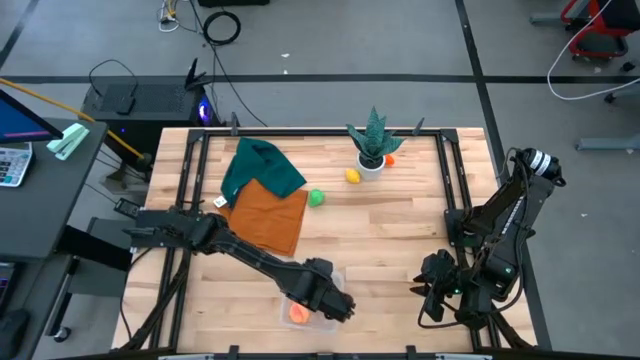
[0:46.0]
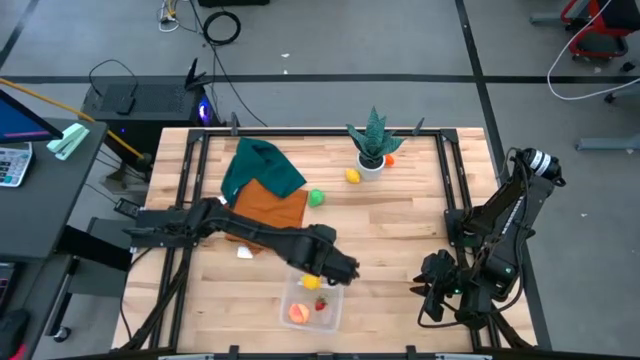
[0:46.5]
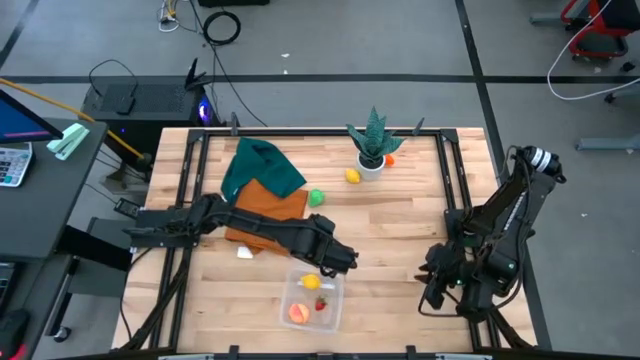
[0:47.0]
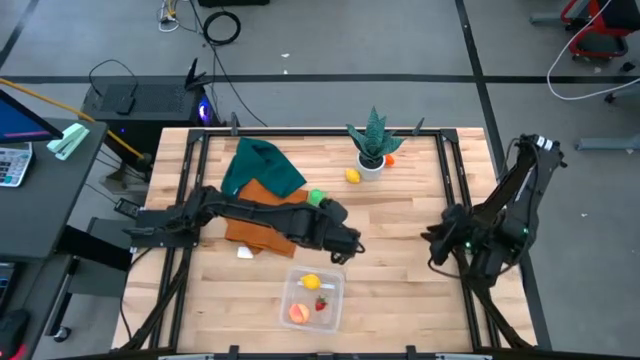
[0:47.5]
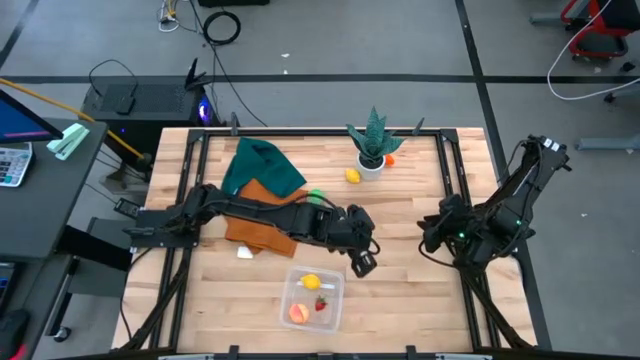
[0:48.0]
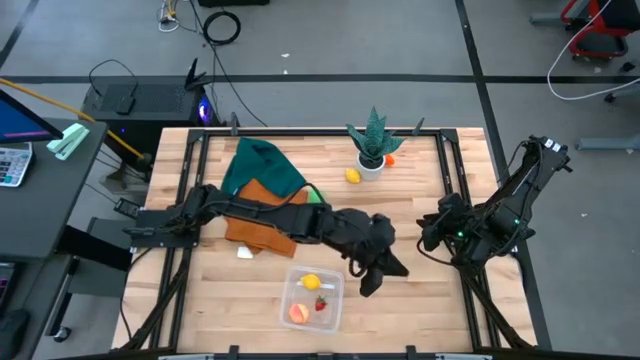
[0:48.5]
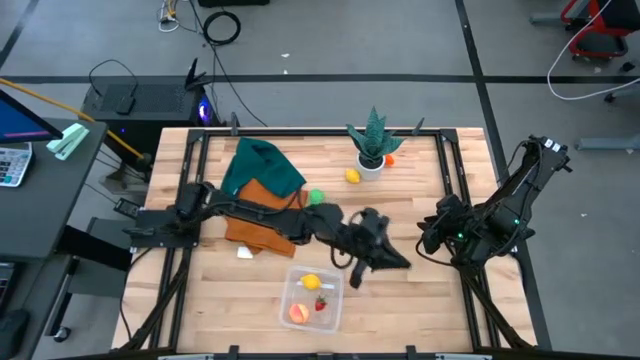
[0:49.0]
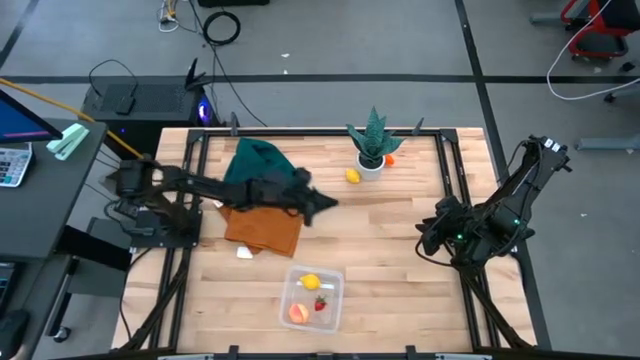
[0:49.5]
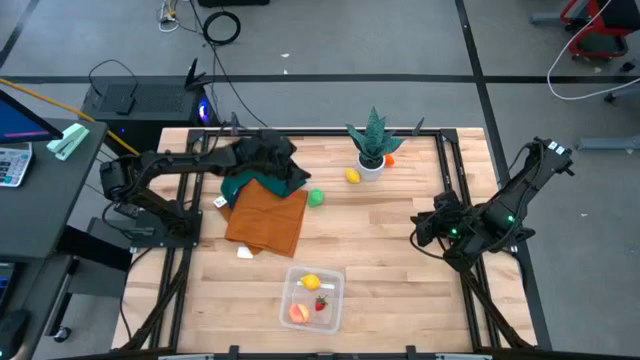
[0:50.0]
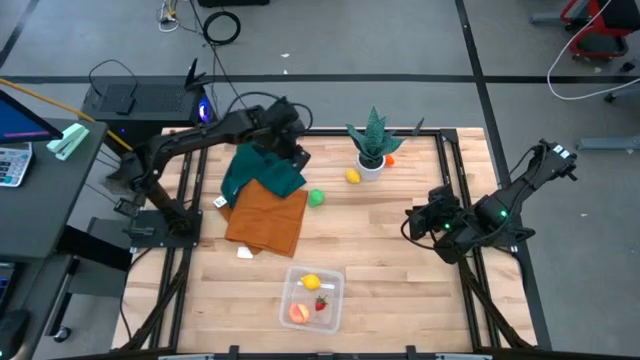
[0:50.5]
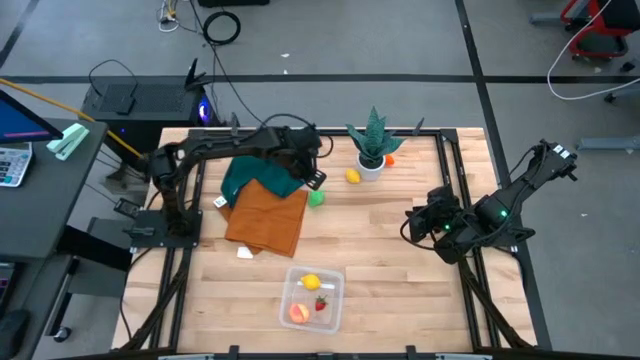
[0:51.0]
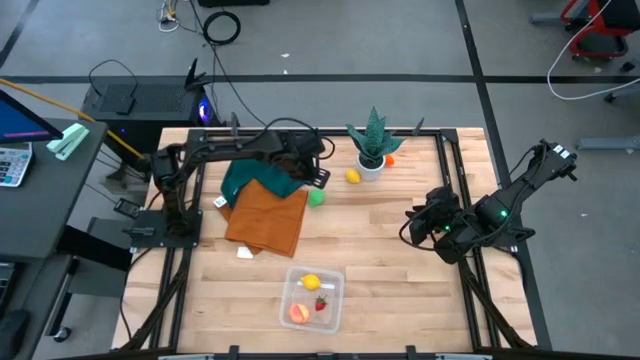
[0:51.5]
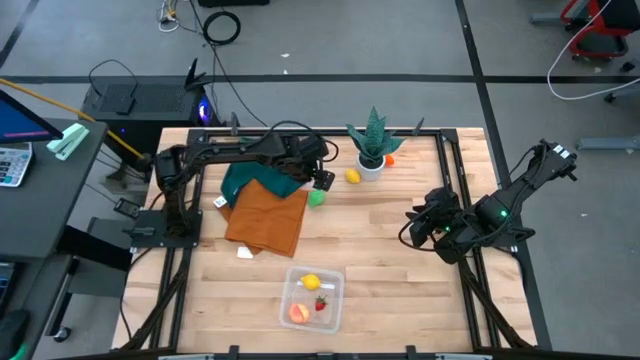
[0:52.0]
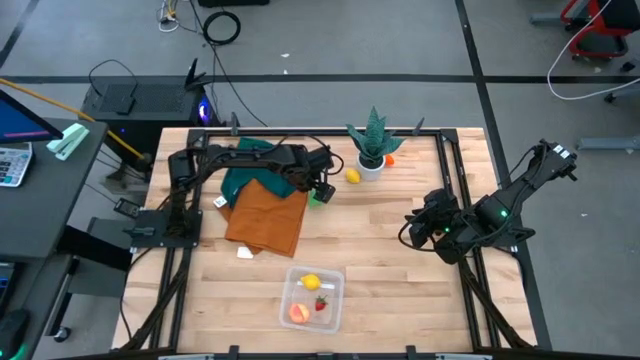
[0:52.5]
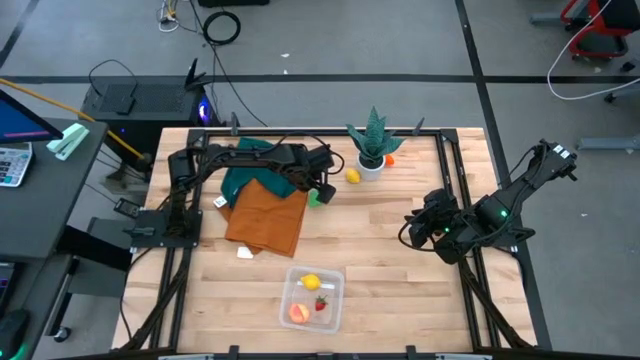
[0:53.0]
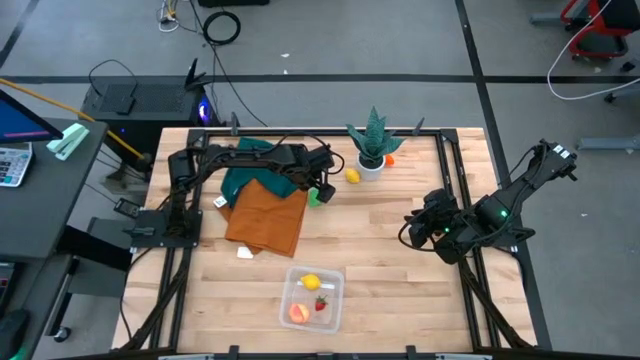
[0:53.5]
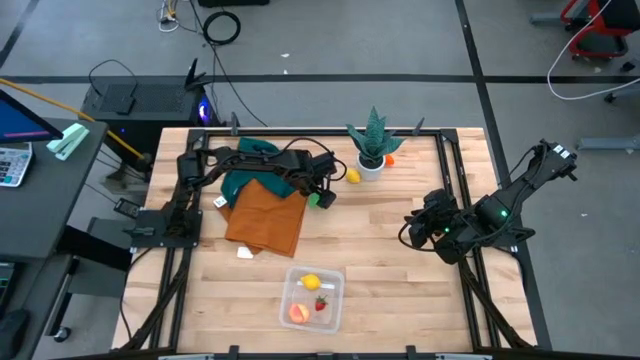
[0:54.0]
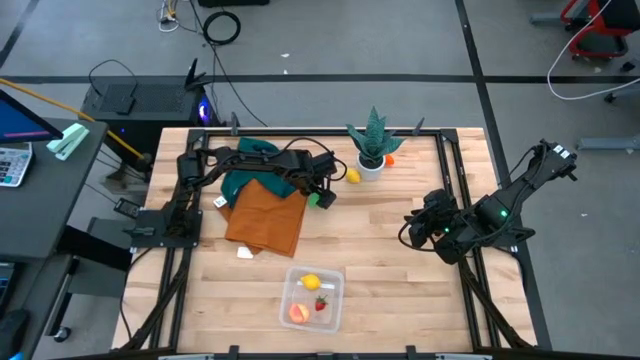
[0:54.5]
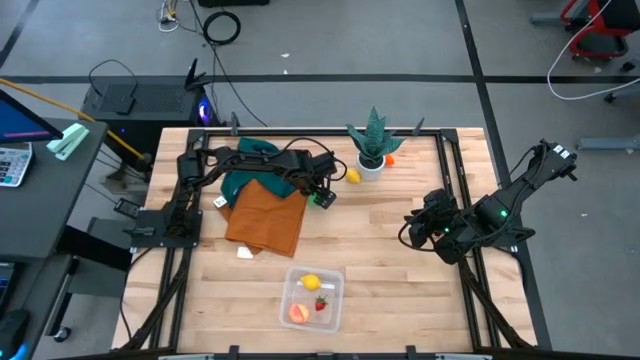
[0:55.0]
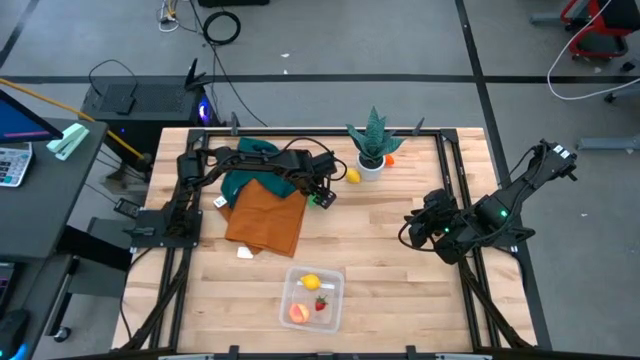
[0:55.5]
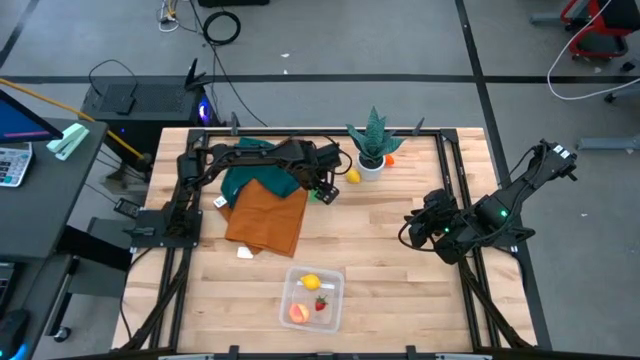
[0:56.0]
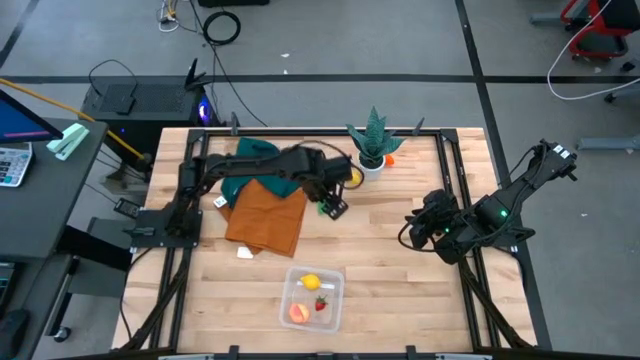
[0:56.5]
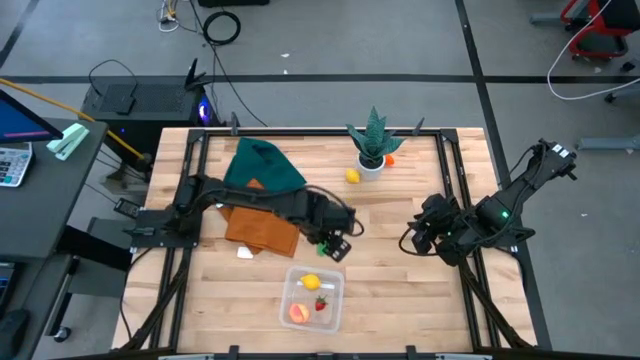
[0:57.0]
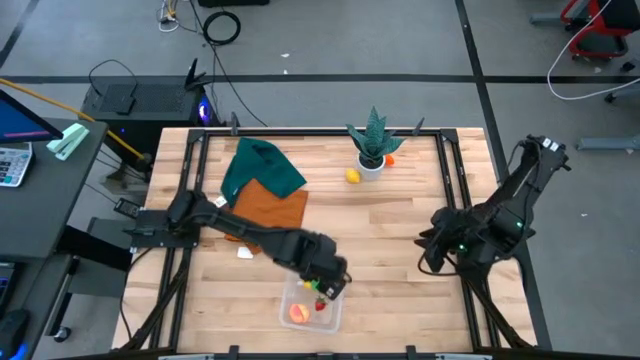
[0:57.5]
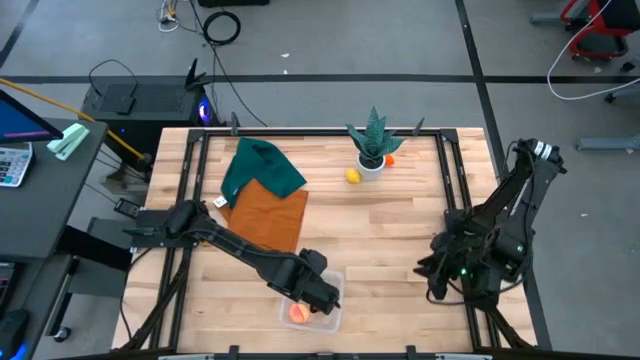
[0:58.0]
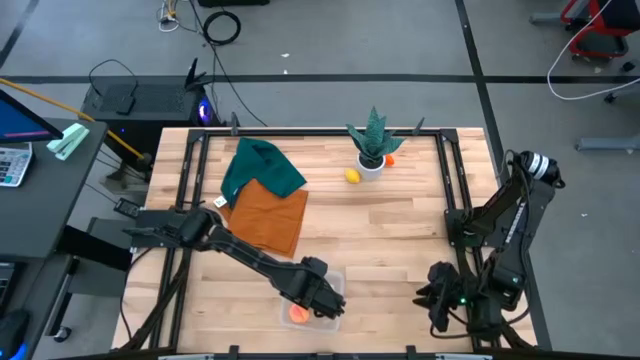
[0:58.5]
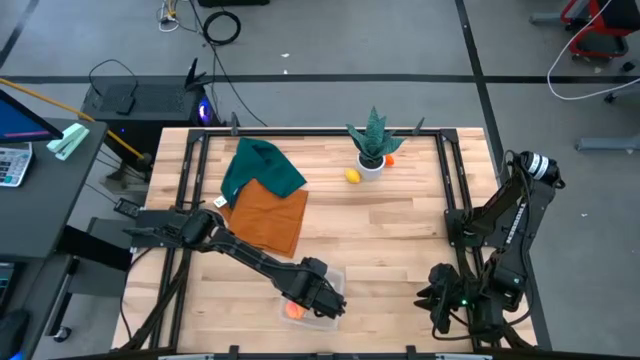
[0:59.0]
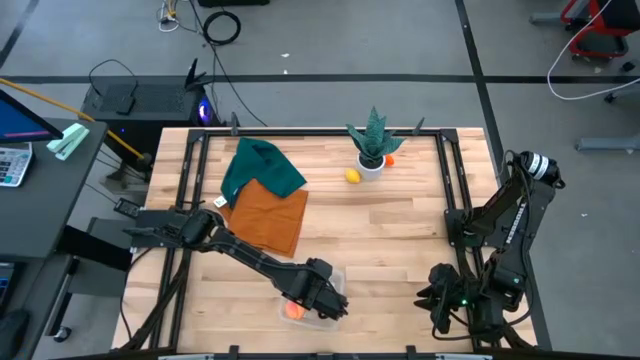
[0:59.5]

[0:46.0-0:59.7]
Task: Pick and placing Produce into tupperware
Put the green pear into the transparent bin

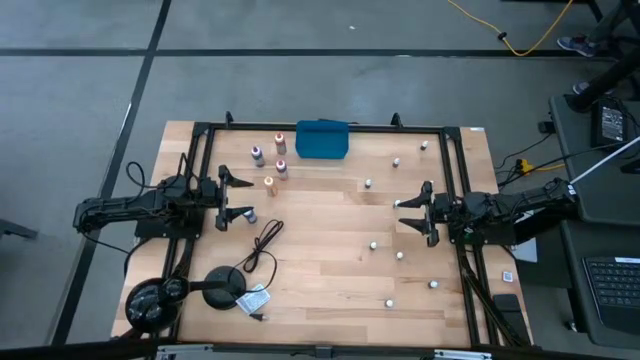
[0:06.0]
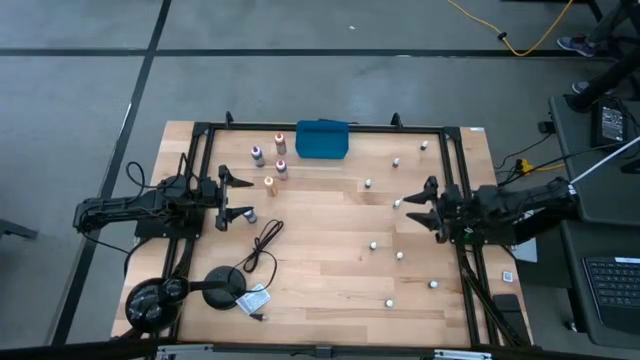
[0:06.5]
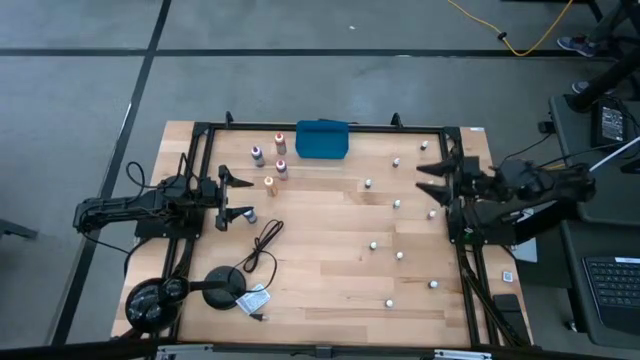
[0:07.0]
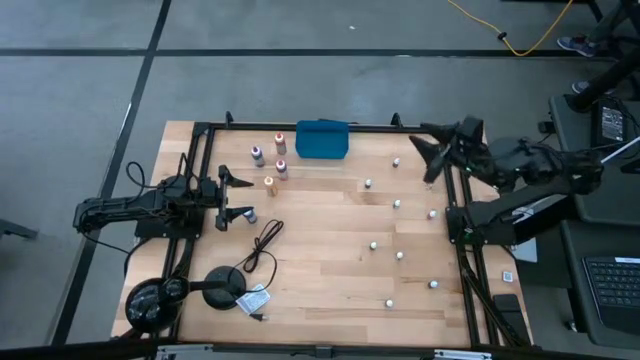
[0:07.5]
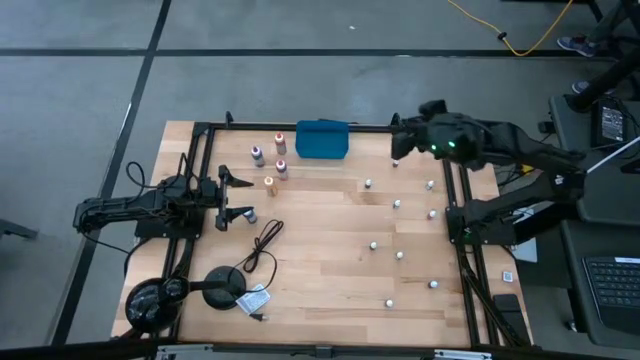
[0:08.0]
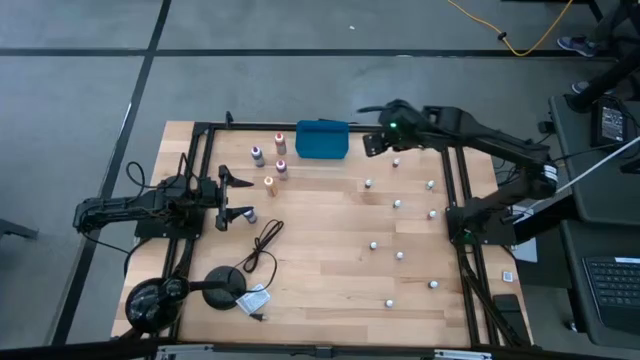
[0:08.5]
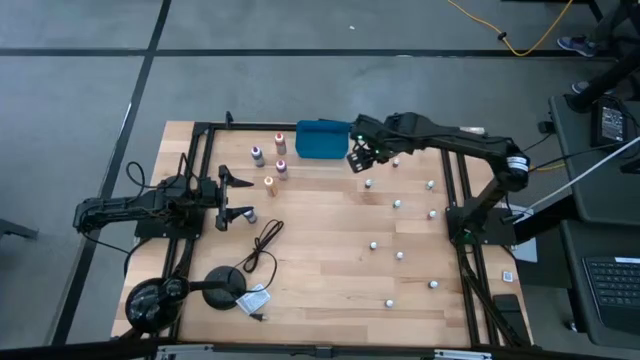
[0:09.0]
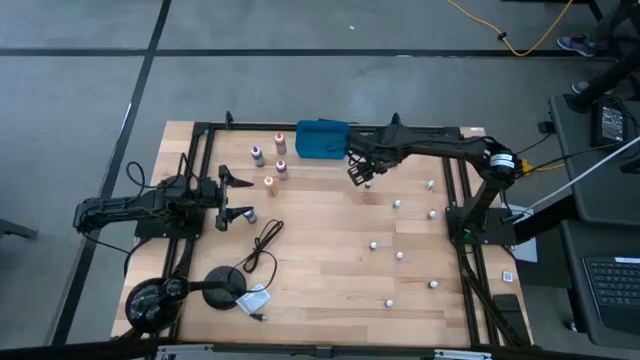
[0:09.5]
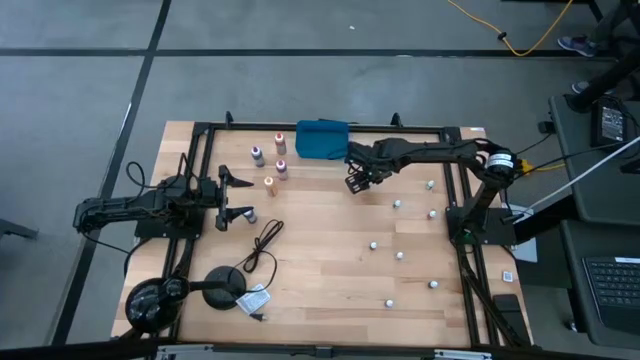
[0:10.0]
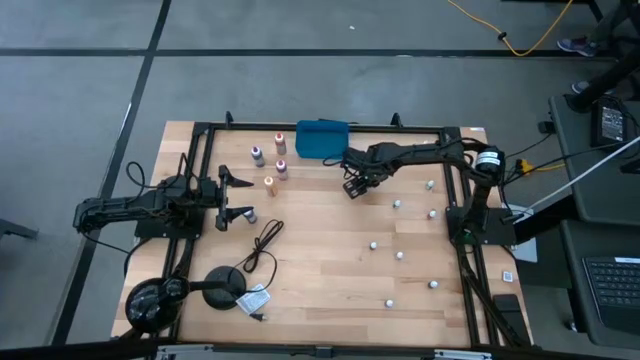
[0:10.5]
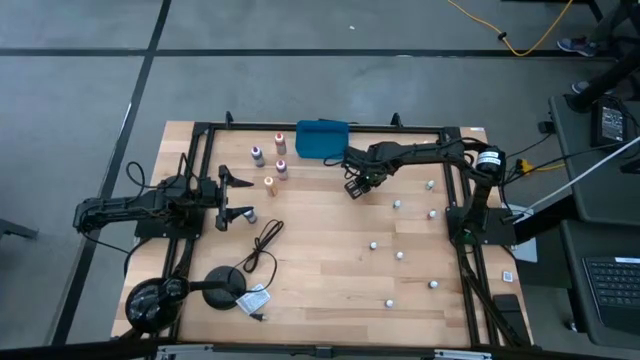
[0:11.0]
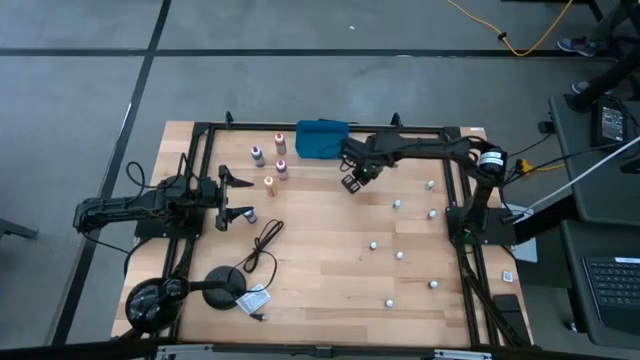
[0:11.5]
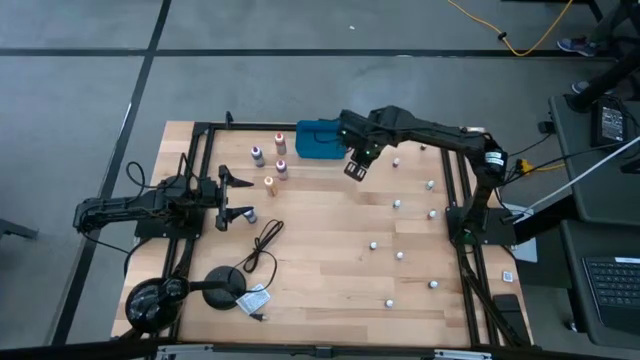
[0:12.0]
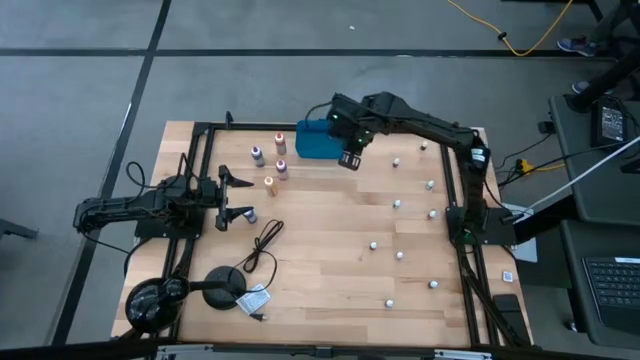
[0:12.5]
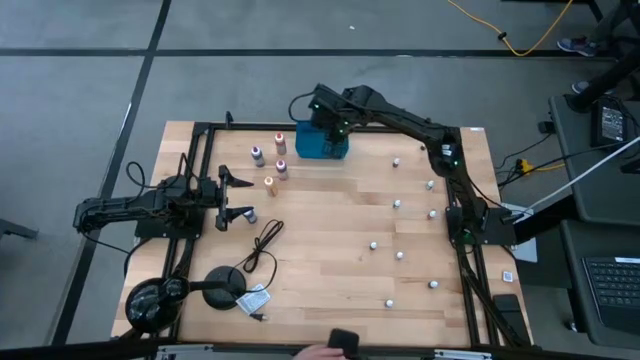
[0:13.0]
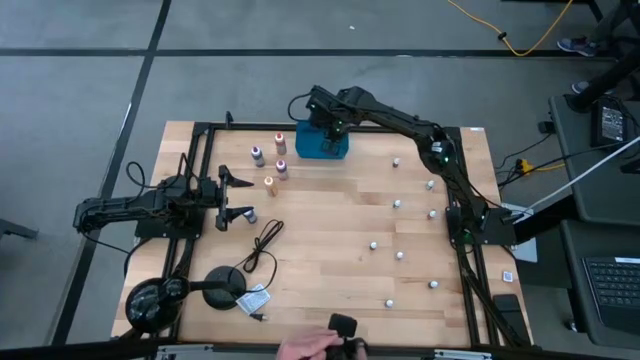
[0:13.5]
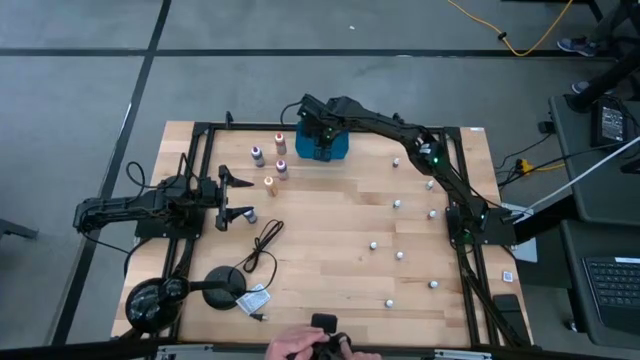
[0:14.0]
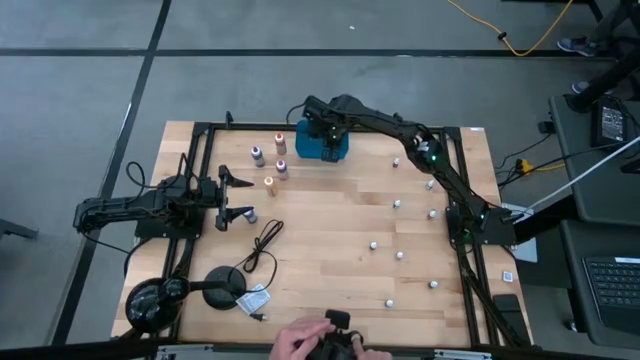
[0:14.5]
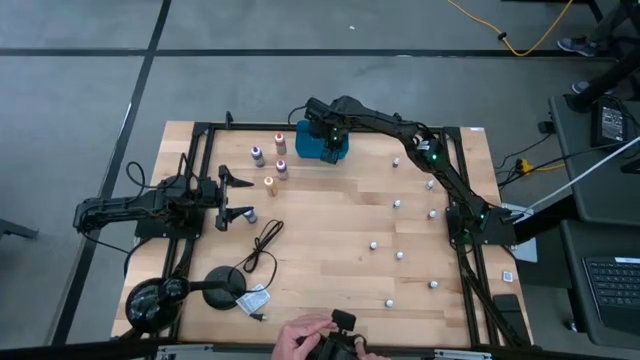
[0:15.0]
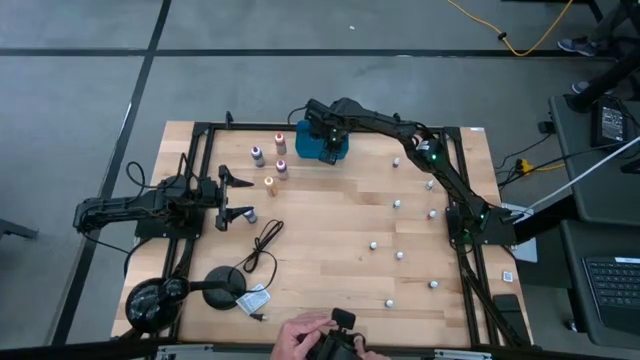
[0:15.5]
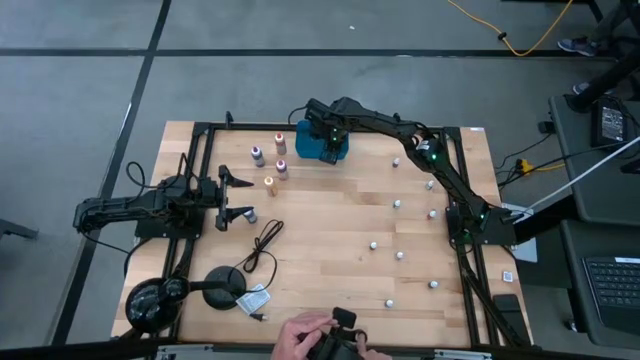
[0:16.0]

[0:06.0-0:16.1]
Task: Pick & Place food coloring
Put the small black food coloring bottle into the blue container
